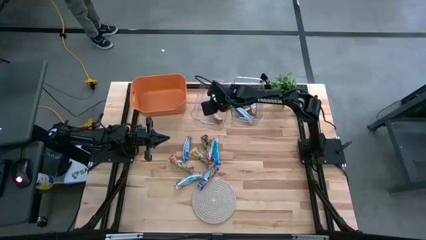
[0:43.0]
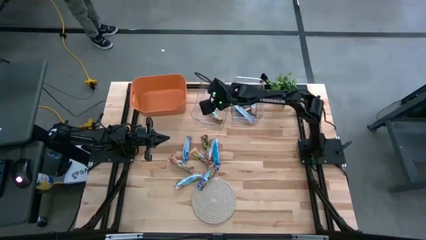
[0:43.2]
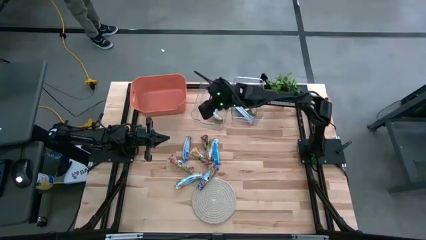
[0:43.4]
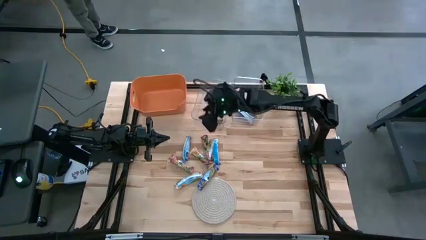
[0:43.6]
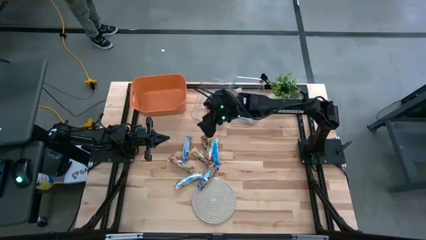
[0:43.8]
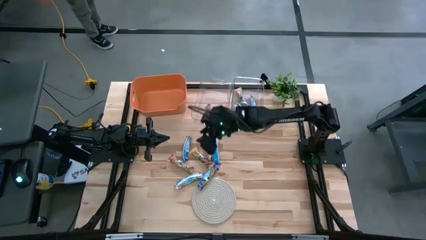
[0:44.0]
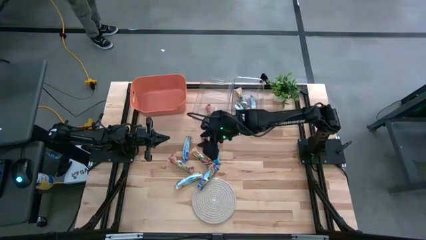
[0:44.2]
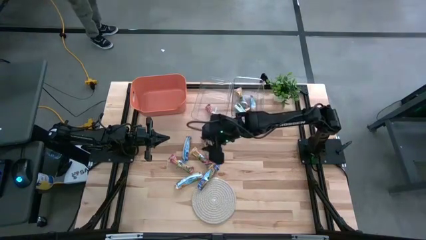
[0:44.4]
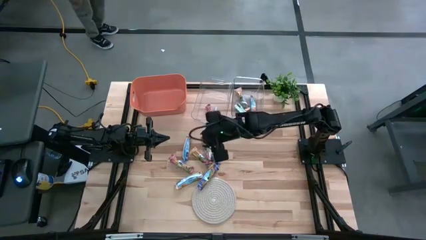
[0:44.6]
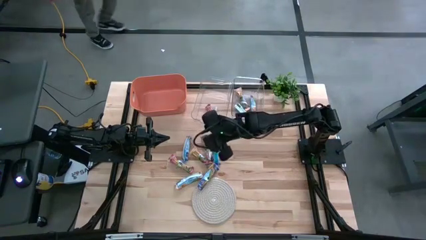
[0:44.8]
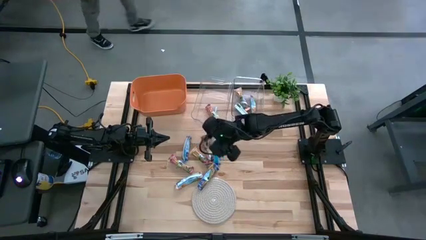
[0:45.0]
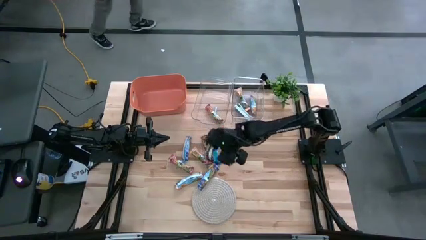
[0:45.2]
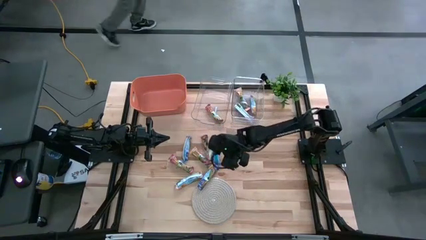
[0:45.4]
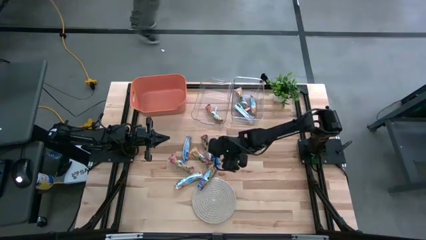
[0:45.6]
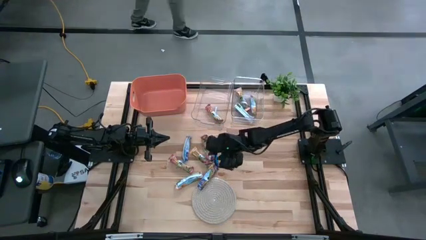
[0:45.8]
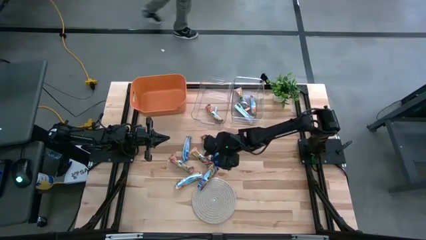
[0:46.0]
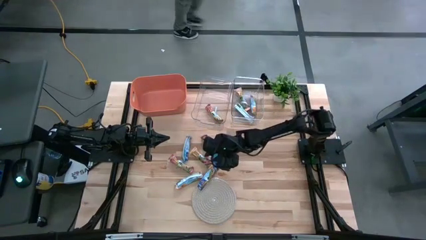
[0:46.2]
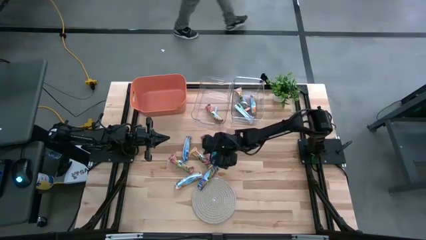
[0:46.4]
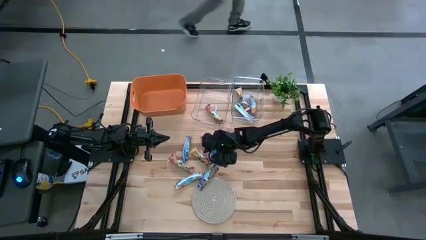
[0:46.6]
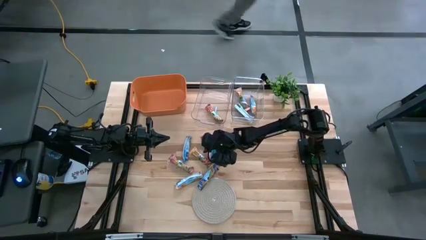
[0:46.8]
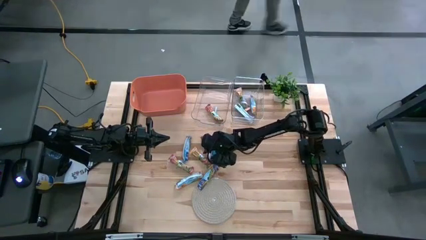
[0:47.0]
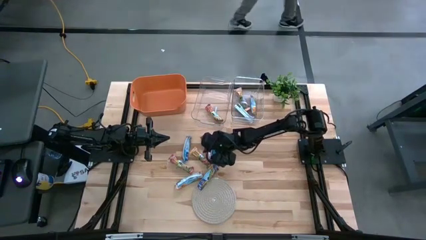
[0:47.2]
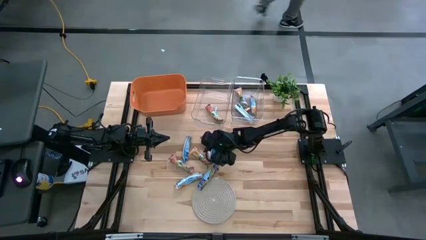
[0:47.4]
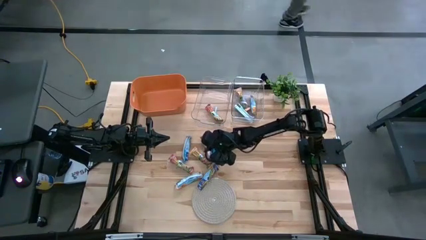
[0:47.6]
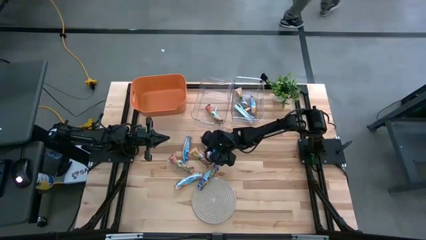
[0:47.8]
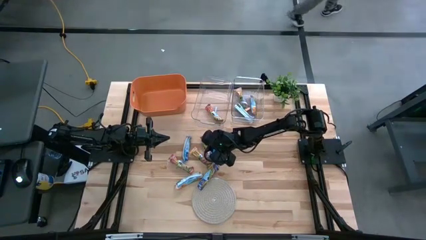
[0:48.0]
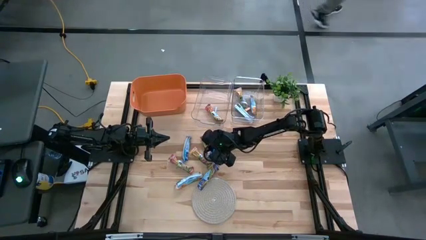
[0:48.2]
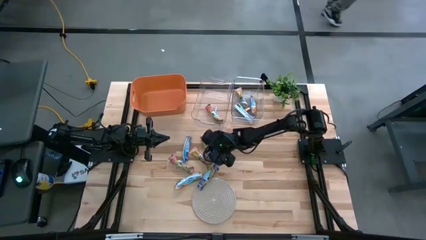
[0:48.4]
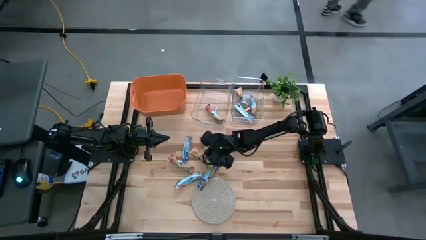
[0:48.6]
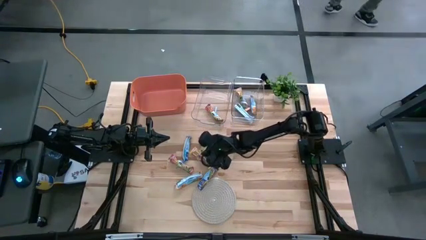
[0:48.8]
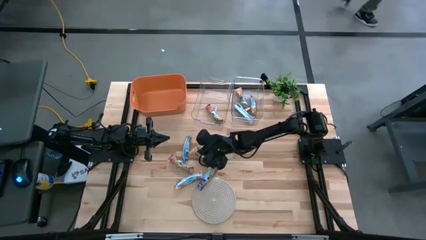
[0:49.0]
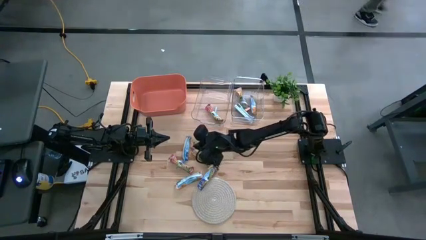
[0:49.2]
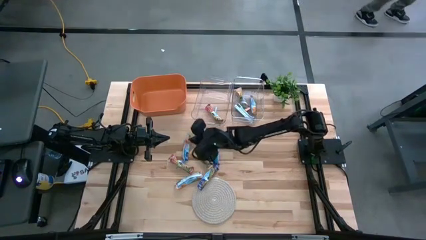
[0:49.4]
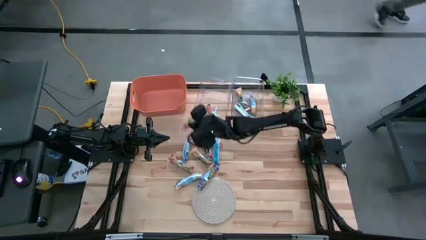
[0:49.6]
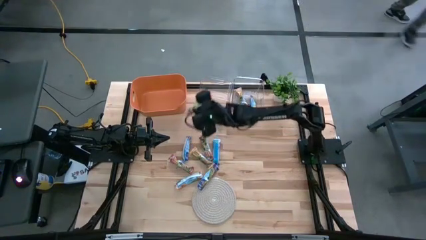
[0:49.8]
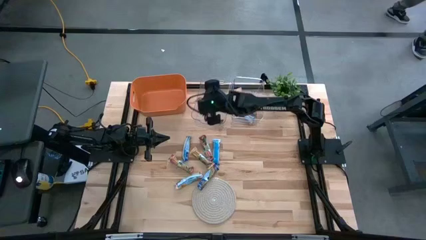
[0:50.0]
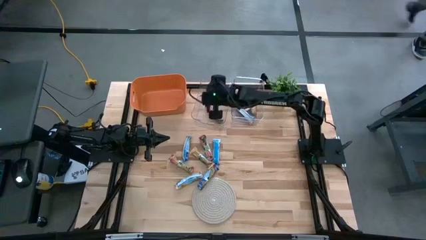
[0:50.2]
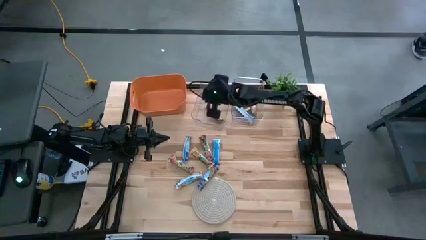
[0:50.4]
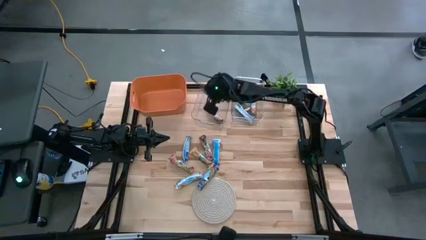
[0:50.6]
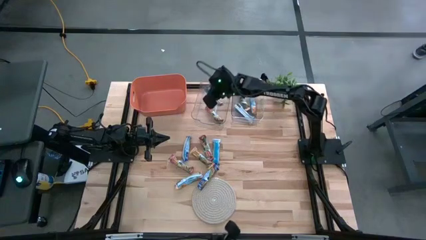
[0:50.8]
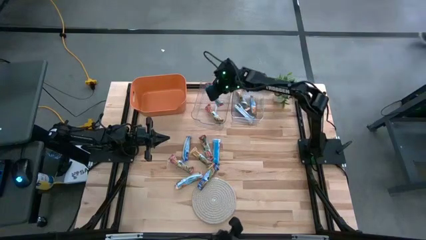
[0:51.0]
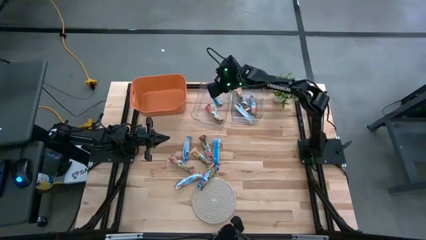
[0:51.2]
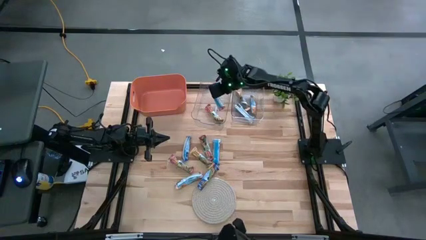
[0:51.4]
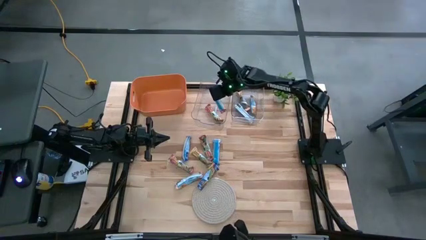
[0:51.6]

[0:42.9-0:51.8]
Task: Pick and place Granola Bars by type
Put the red granola bar into the left transparent bin

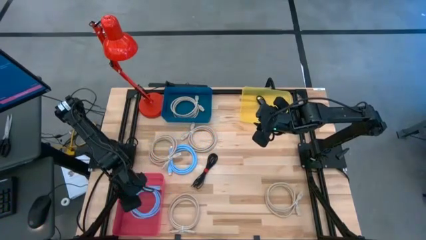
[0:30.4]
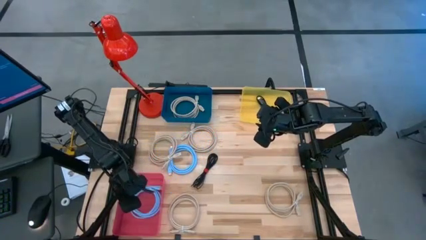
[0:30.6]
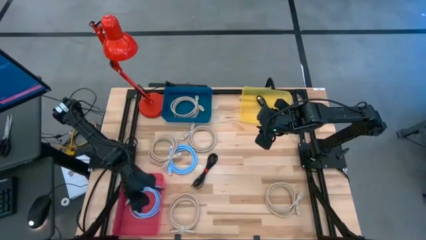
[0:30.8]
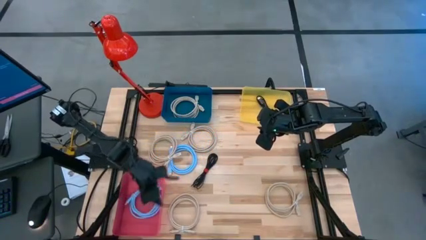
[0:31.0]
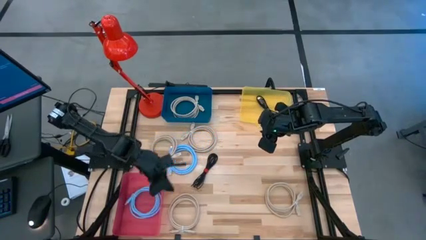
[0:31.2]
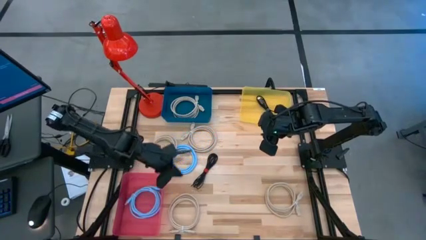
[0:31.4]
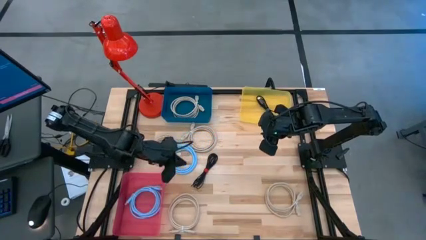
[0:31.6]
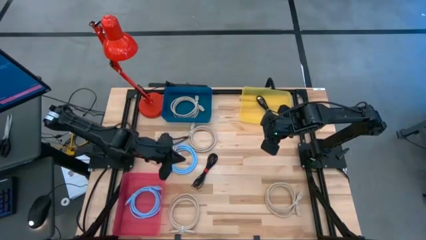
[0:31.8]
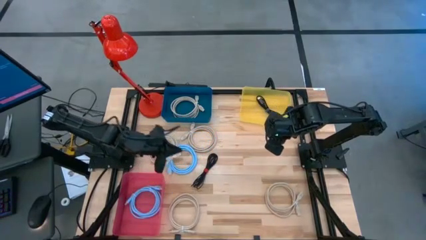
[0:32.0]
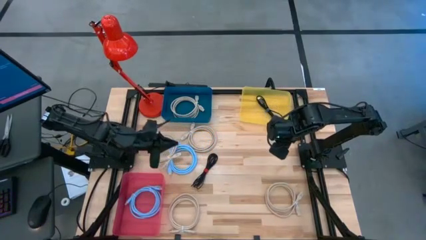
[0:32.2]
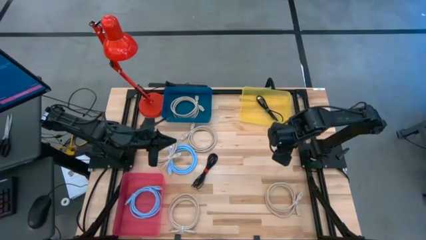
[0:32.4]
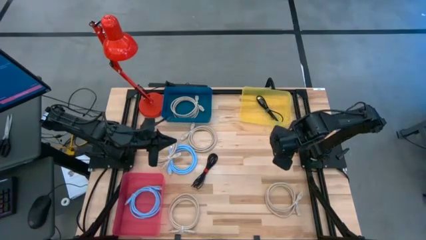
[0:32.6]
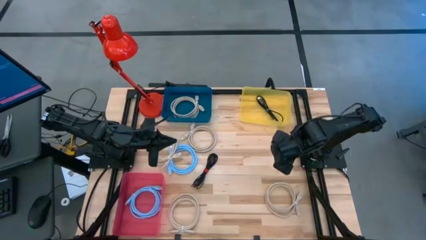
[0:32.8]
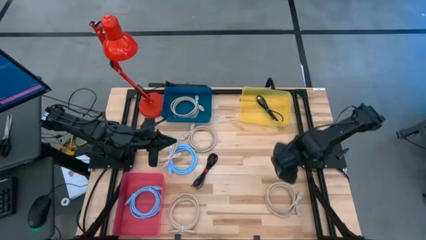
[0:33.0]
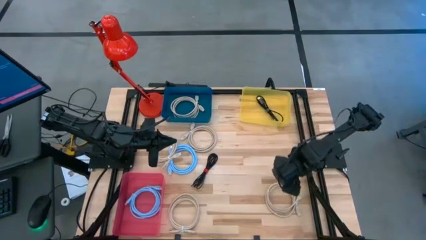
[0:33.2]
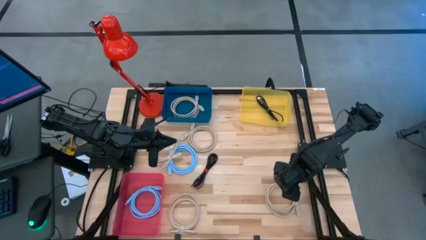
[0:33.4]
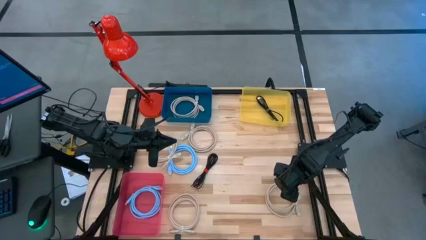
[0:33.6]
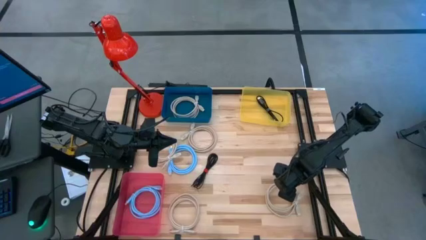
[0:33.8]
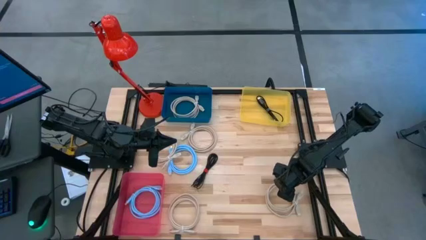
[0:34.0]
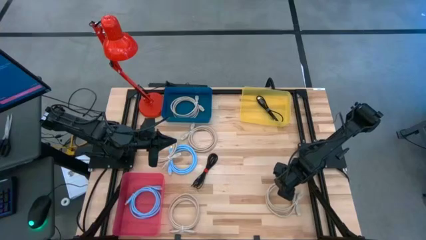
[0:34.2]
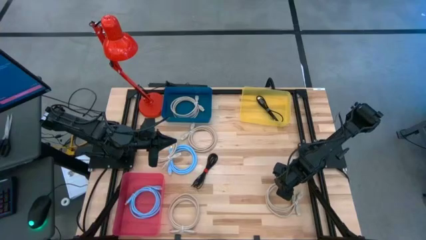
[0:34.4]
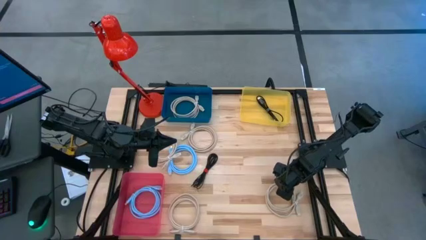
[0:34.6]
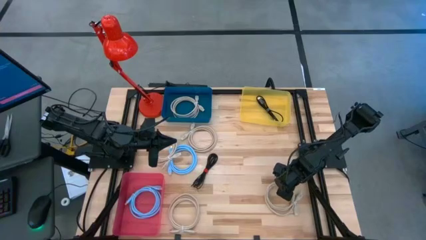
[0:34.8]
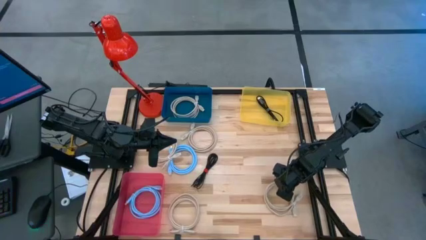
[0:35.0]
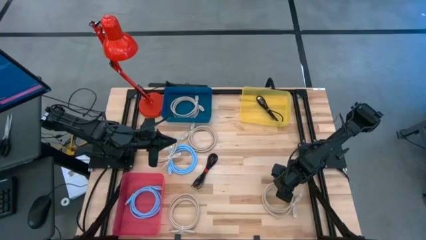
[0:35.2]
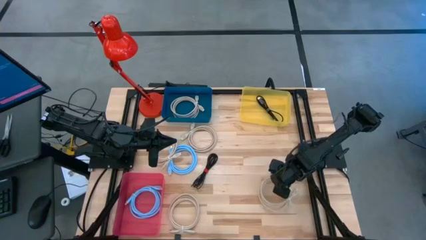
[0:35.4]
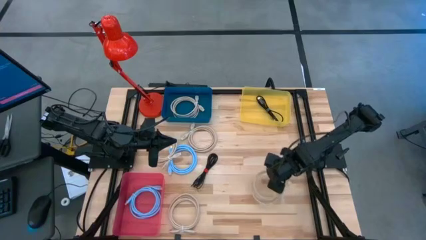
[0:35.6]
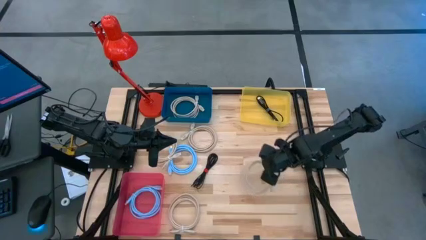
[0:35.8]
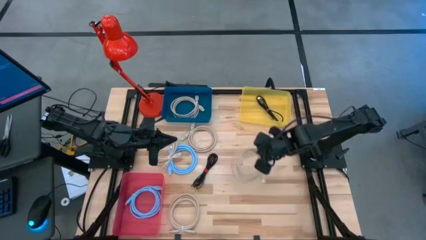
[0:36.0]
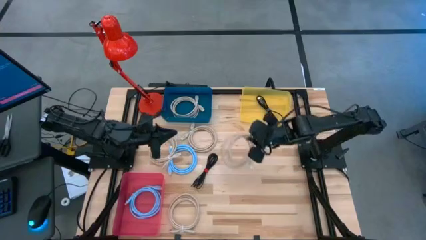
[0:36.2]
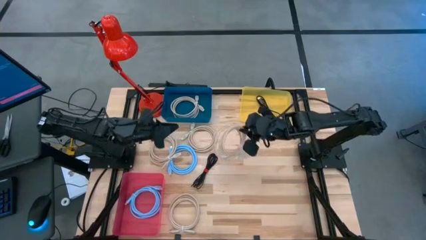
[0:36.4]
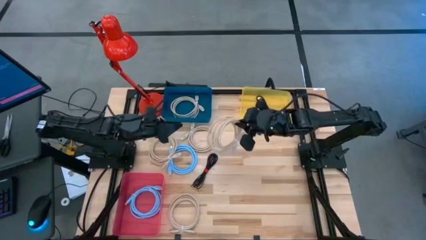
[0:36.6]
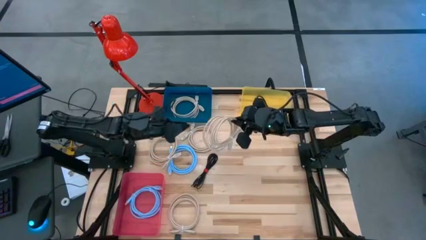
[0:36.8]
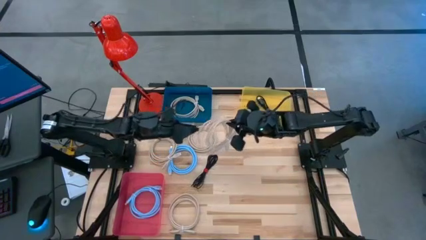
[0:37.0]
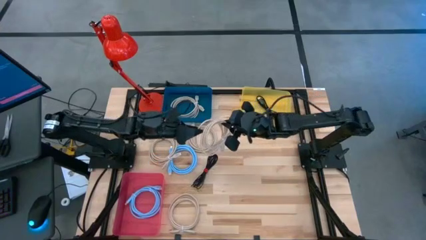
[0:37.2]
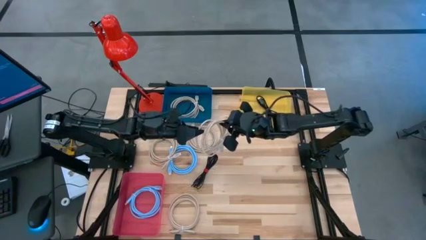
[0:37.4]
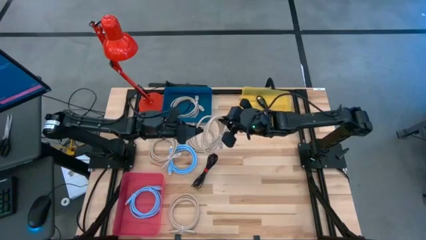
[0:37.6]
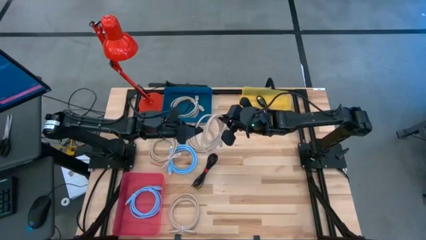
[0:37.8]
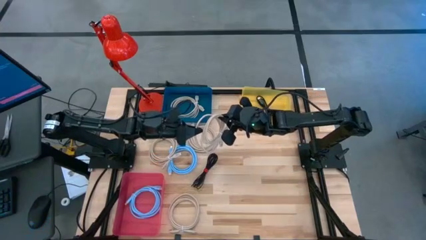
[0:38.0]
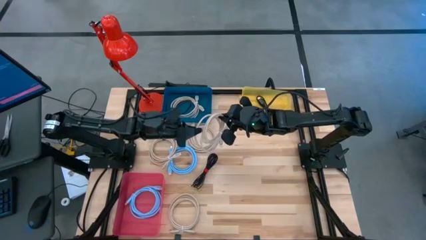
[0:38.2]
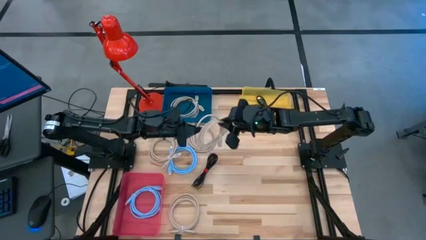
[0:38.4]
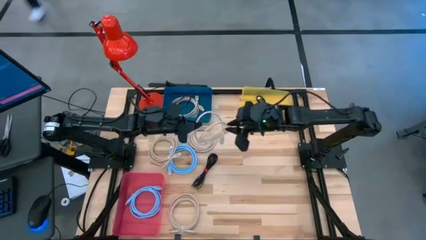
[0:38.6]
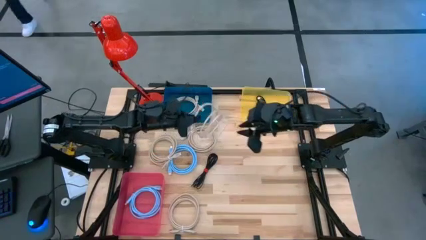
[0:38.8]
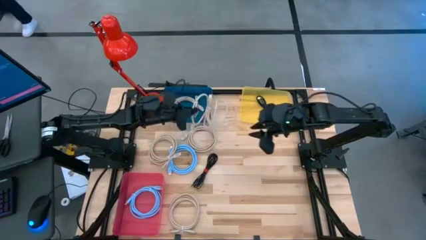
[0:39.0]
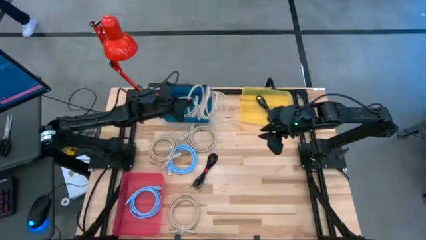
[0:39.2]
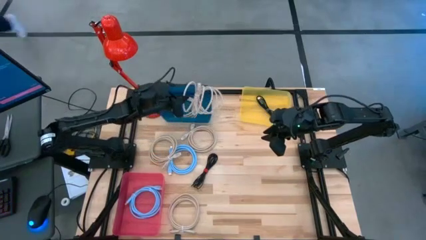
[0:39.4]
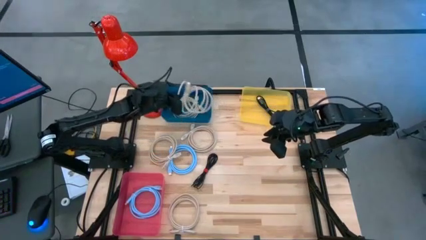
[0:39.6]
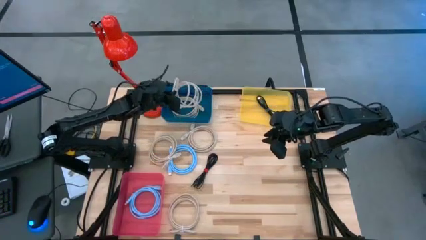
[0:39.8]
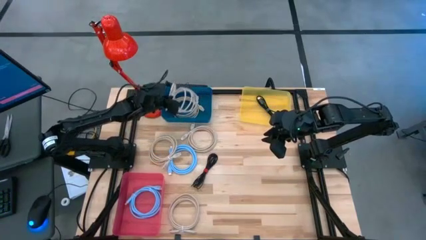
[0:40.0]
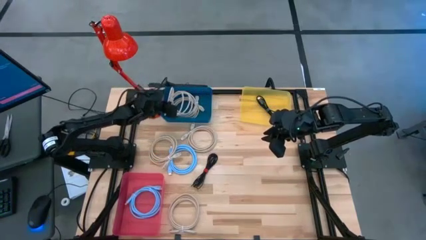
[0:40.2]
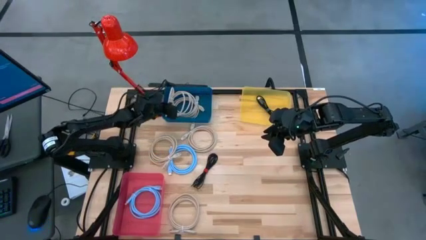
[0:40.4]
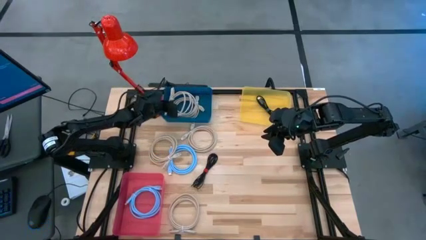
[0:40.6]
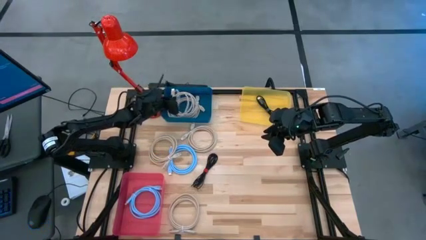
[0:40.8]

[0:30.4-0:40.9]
Task: Pick & Place USB Port
Put the brown display cable into the blue bin
